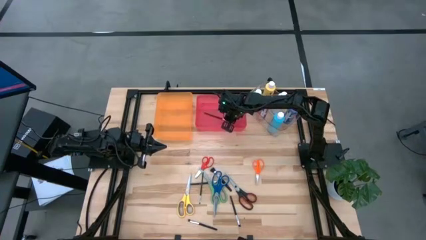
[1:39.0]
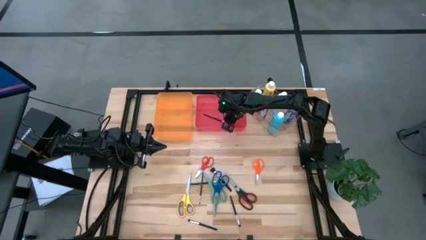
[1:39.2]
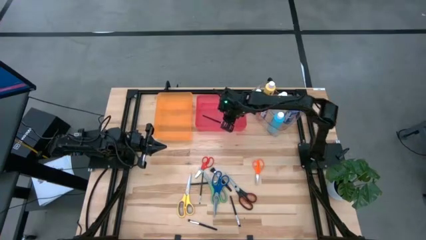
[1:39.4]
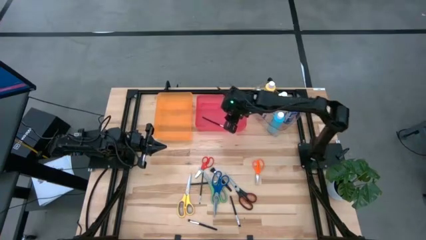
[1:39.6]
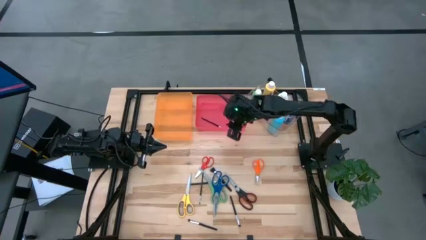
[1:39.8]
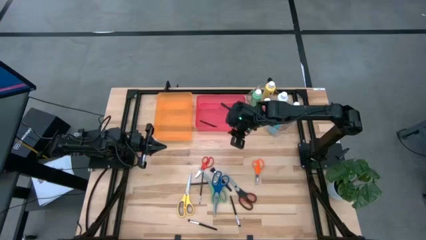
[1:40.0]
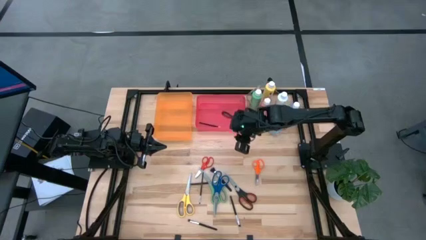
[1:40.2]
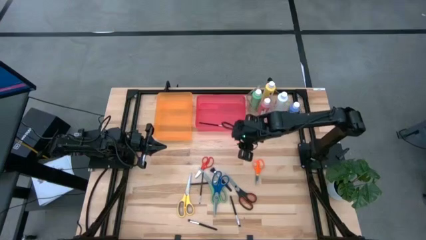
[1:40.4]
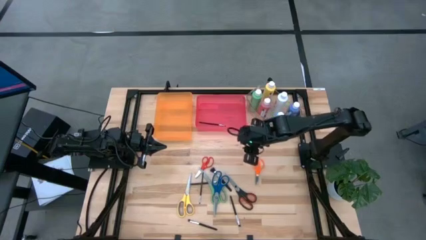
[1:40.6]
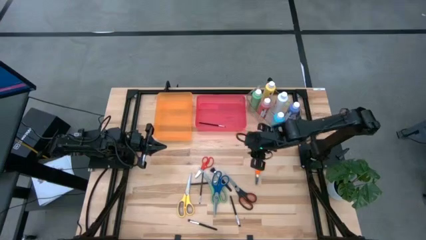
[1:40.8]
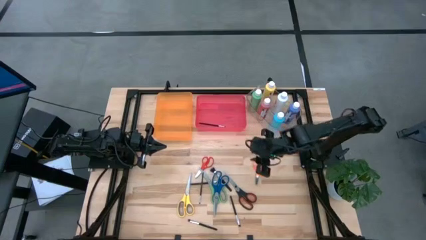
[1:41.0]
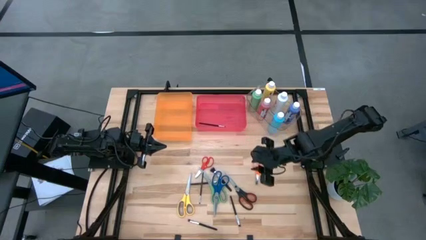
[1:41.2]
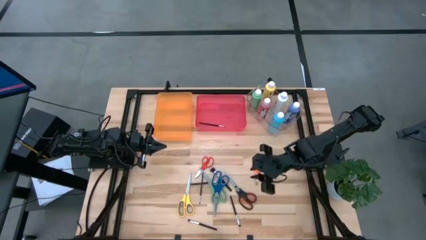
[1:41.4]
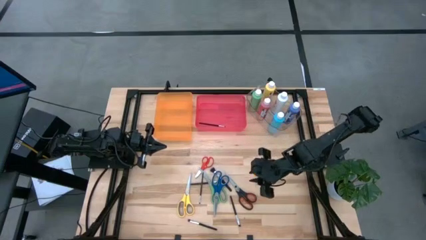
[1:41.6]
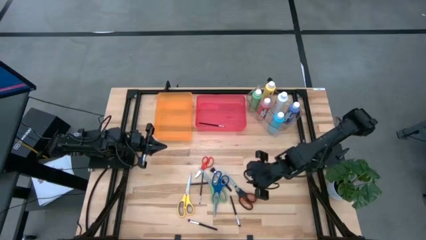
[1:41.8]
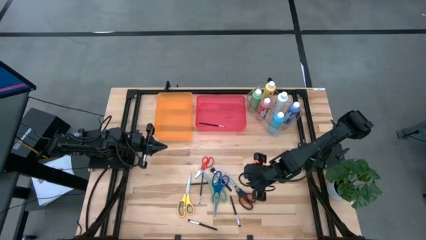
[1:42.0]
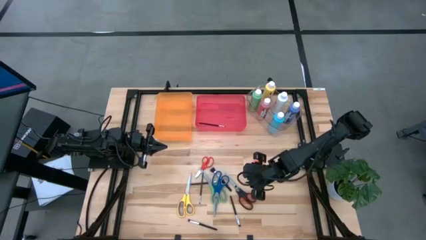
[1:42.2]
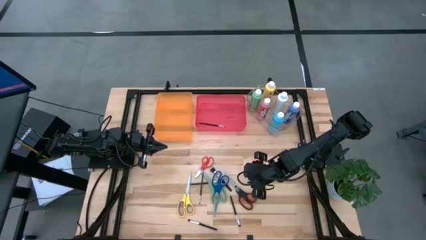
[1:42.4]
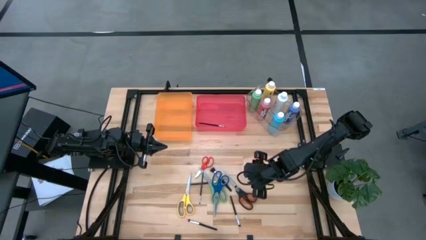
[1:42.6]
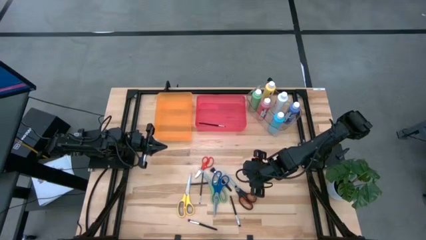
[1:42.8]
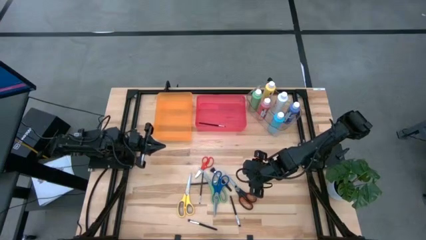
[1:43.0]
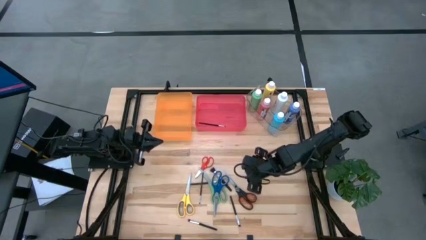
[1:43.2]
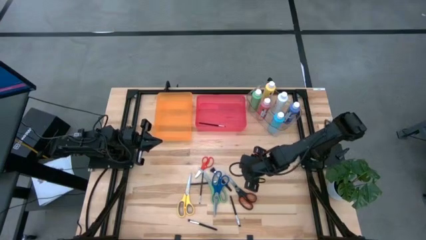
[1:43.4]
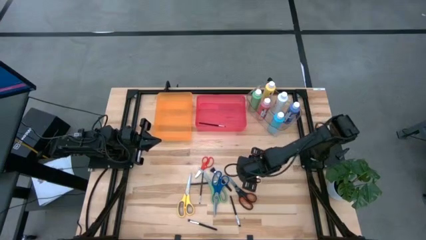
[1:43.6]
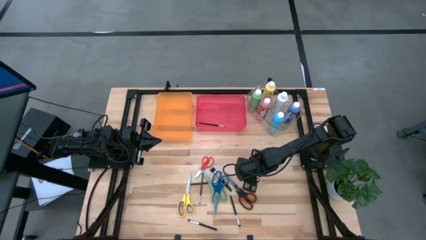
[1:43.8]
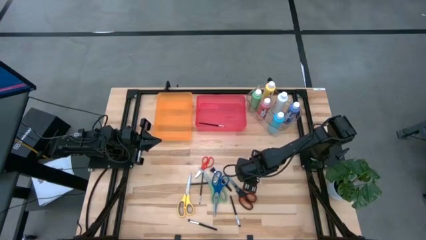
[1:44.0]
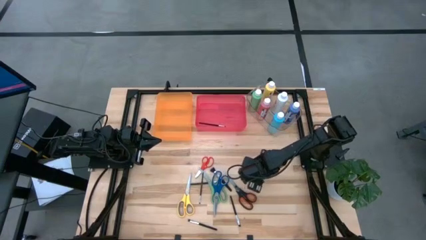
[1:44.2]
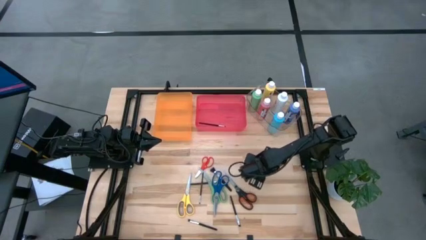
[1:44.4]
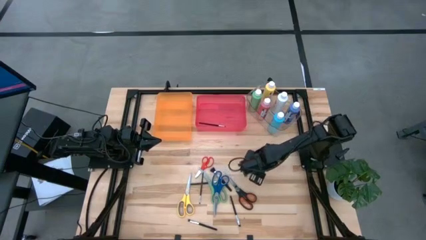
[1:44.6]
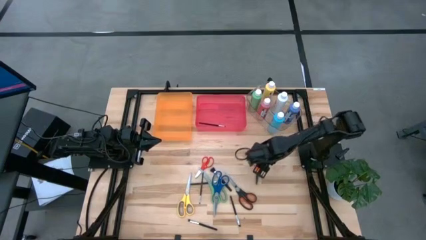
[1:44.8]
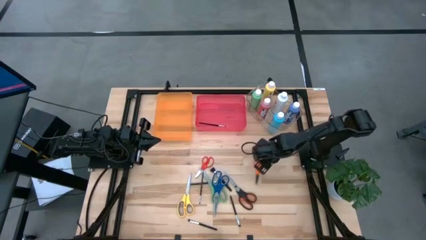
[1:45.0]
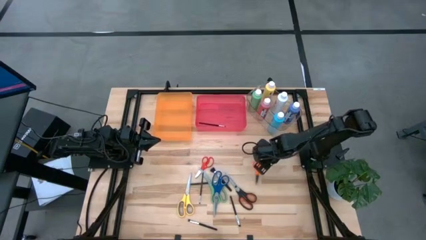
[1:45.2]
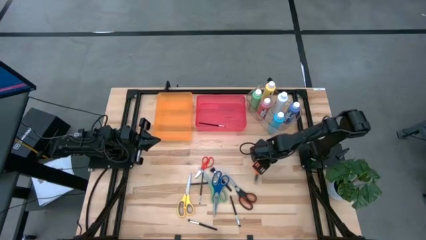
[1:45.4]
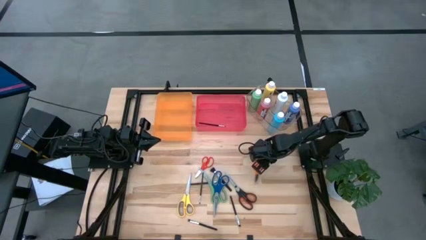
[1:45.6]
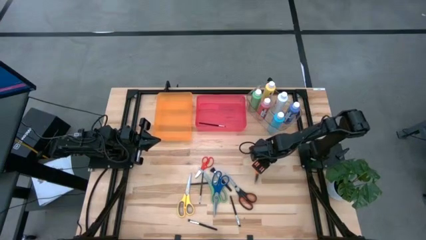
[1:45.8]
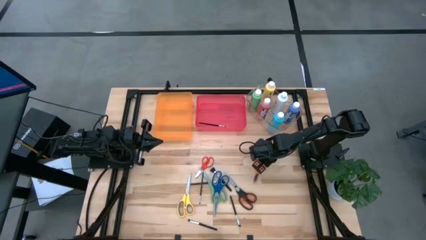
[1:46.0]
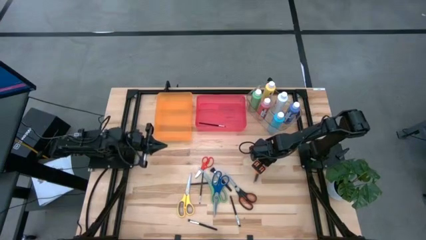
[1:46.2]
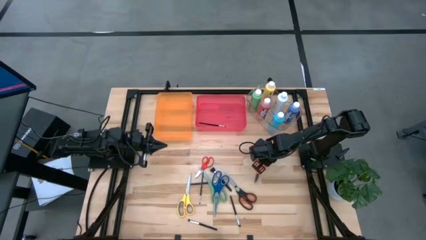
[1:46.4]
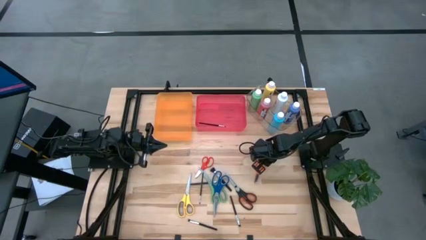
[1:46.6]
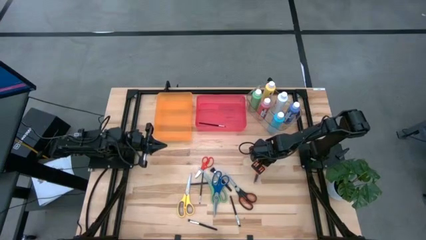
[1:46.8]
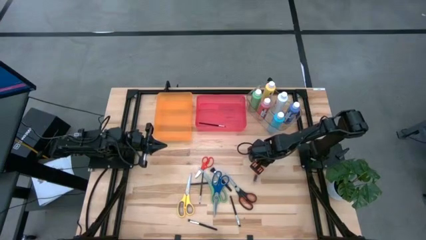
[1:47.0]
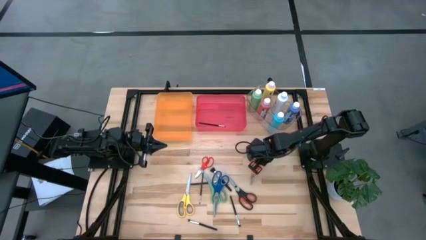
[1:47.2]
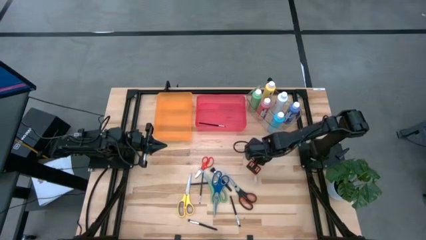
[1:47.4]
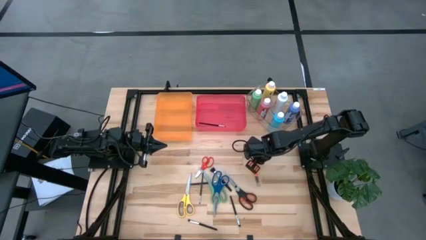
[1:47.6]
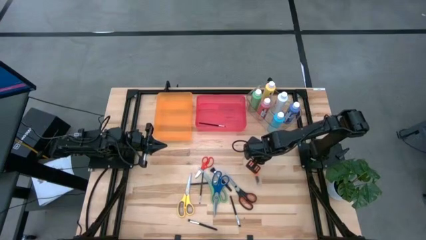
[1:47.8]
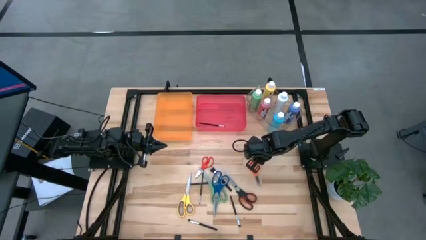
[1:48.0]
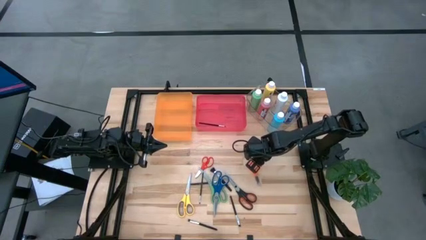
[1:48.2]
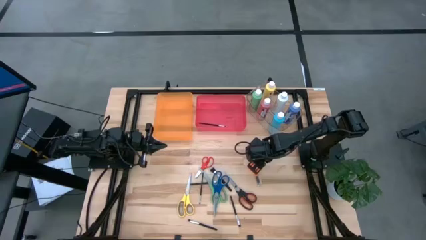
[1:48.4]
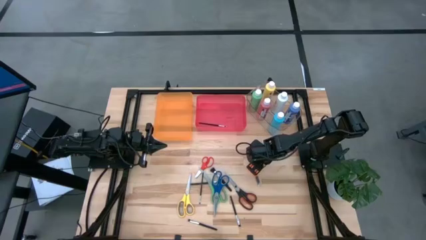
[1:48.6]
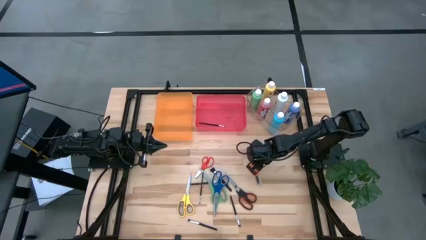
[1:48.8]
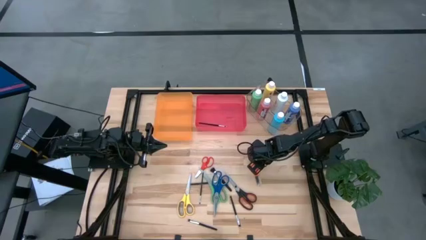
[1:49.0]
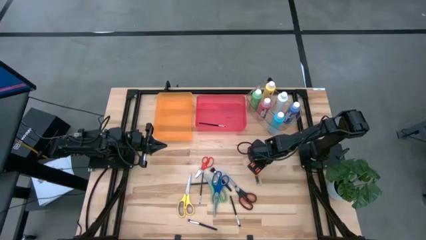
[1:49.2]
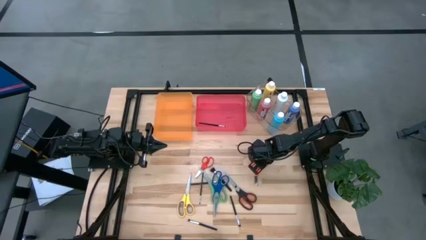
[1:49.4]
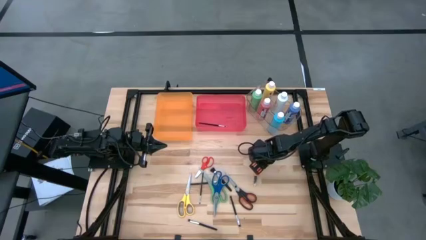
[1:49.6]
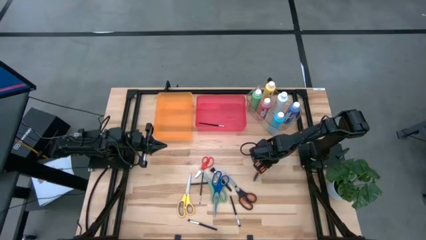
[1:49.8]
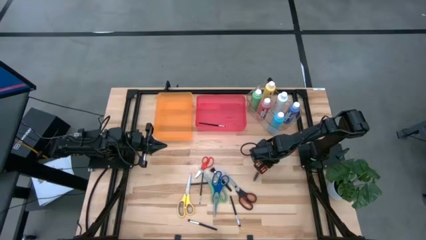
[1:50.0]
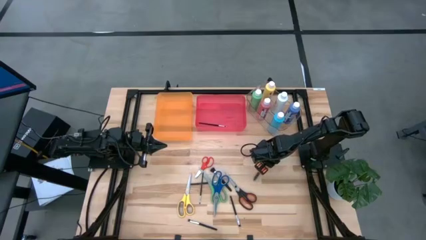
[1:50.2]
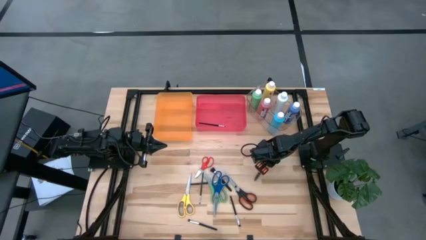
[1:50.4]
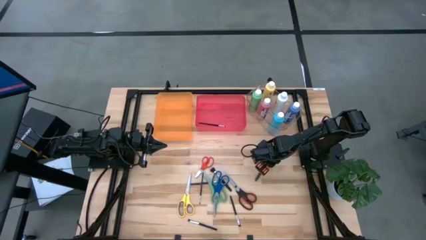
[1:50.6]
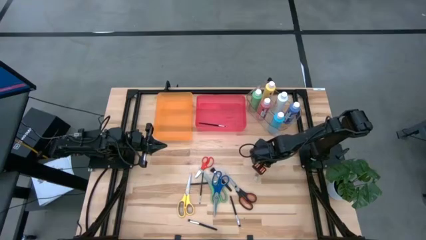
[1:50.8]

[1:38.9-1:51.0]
Task: Pick & Place Paint Supplies
Put the orange scissors into the orange bin

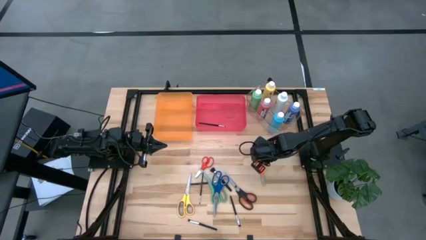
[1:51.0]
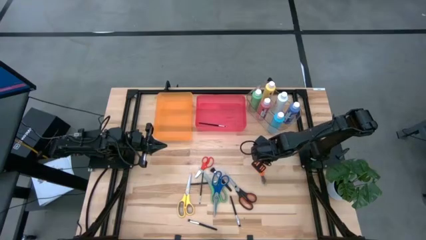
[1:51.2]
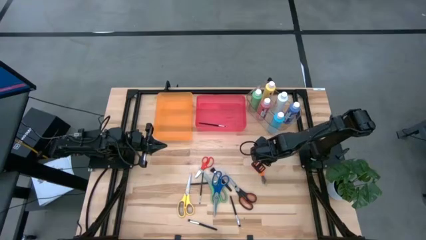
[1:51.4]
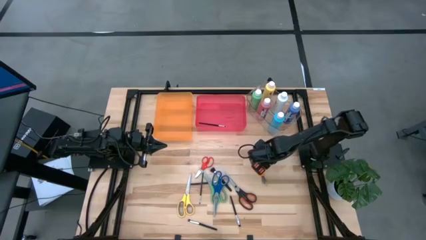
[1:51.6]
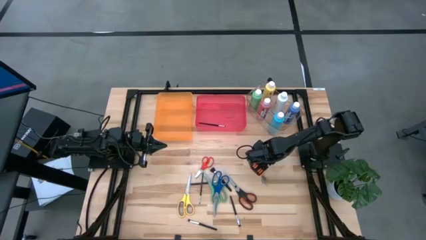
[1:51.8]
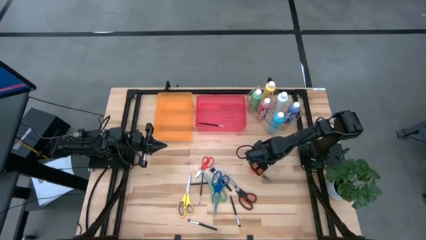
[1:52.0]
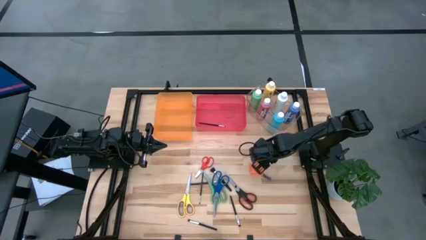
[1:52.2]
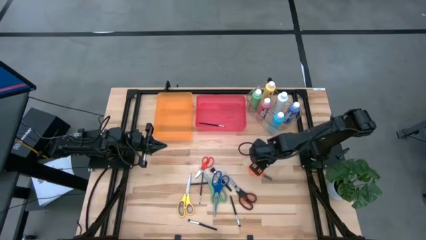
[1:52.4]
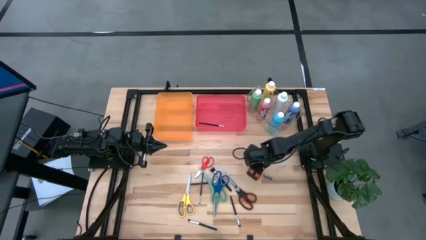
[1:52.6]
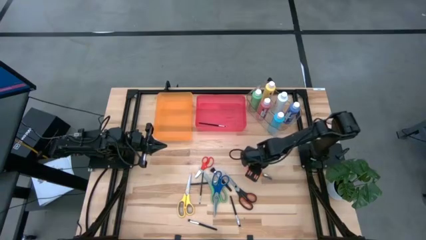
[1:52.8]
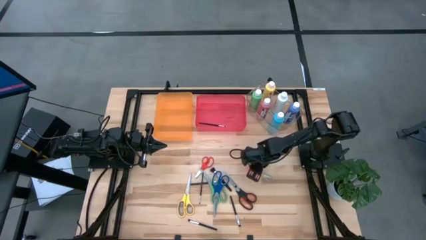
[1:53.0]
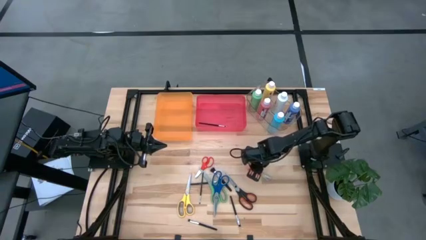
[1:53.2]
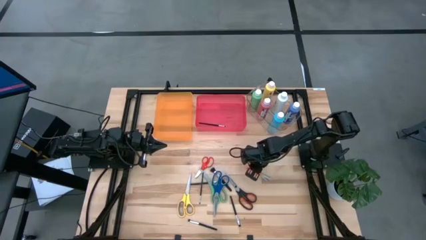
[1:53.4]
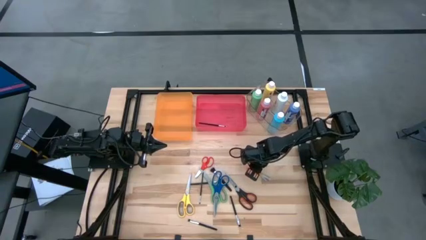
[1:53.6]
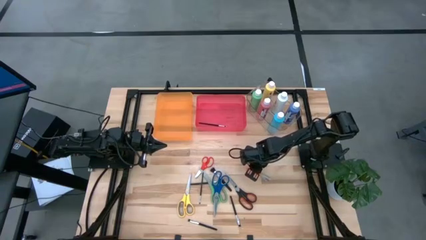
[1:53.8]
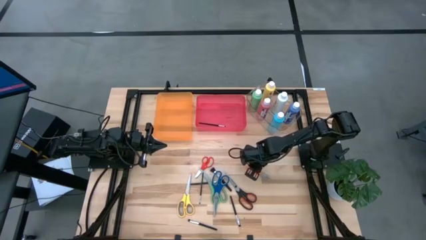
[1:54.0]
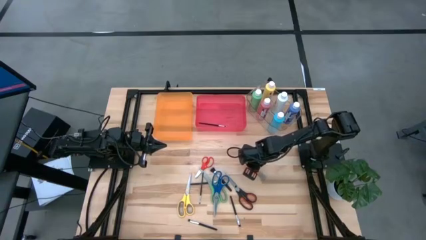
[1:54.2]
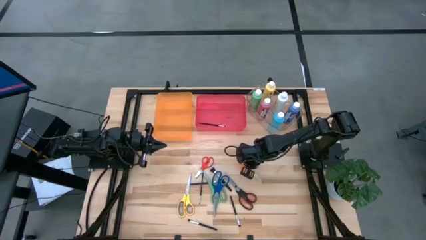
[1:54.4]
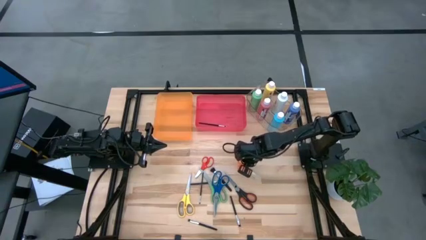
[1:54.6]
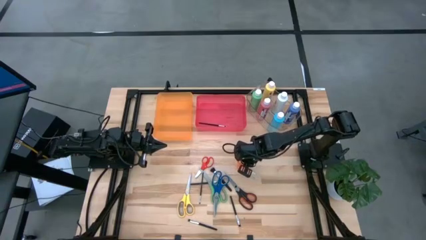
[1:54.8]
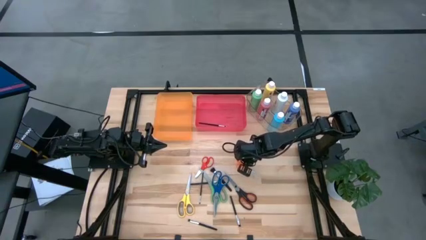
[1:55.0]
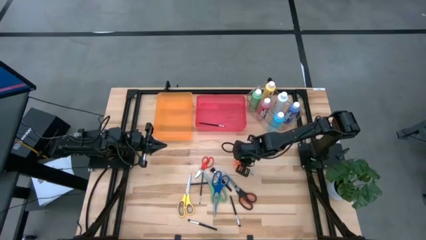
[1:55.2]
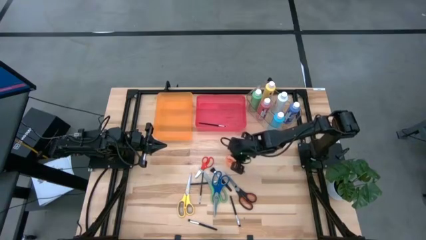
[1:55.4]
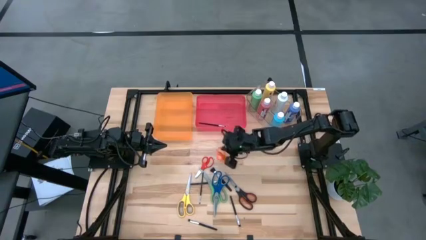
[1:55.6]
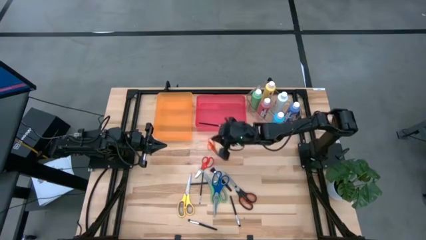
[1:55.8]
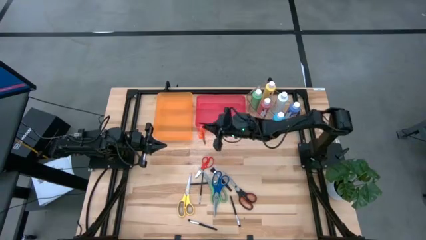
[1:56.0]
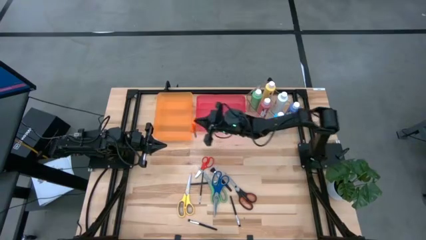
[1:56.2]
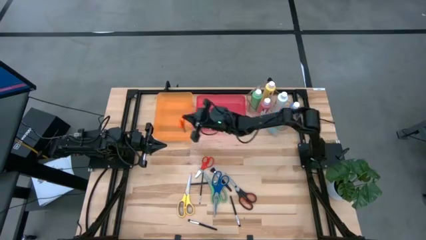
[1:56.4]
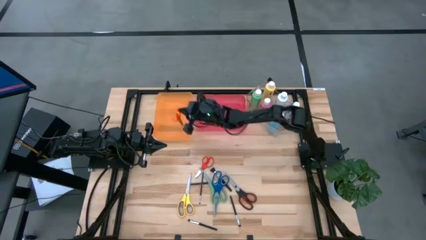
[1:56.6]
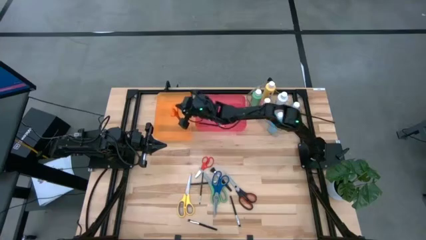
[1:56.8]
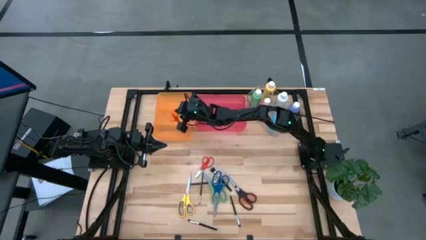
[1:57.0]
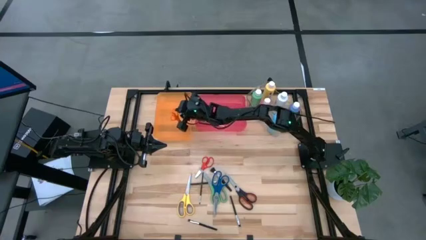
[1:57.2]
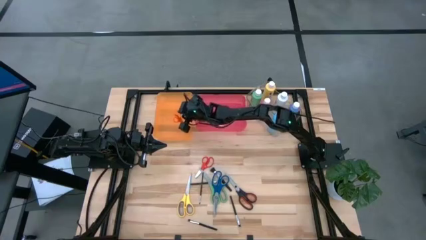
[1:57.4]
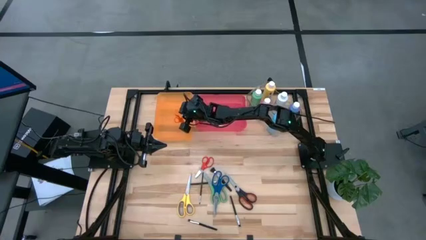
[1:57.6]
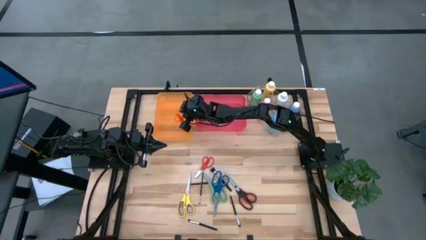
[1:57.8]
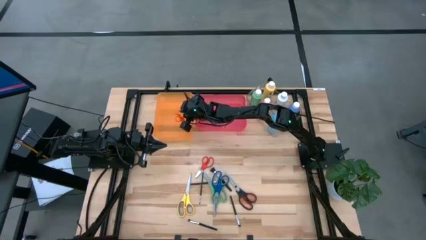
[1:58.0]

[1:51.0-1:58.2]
Put the orange scissors into the orange bin
